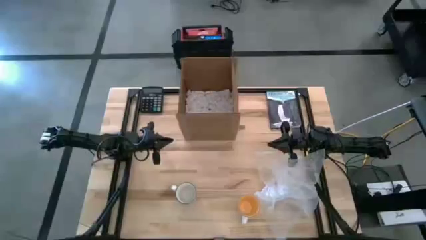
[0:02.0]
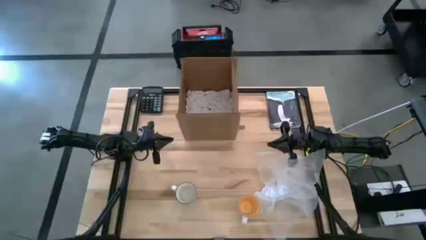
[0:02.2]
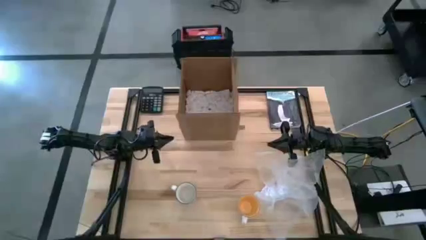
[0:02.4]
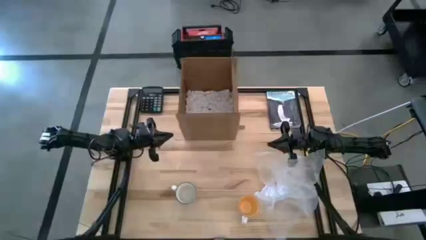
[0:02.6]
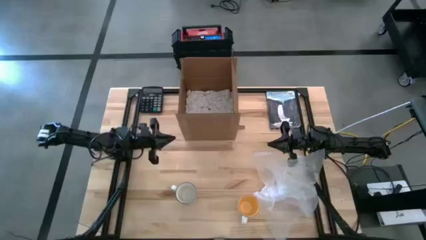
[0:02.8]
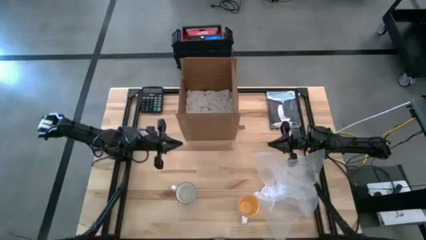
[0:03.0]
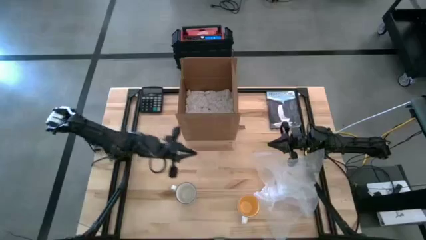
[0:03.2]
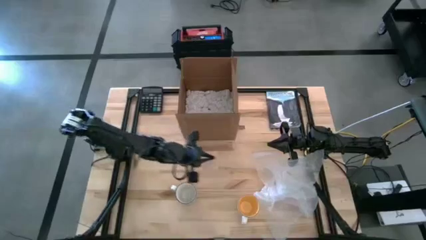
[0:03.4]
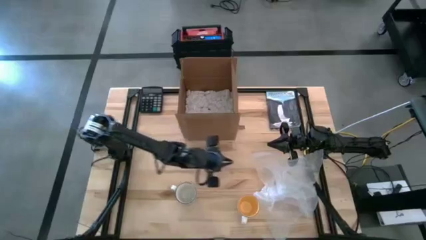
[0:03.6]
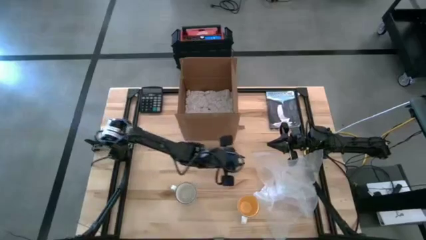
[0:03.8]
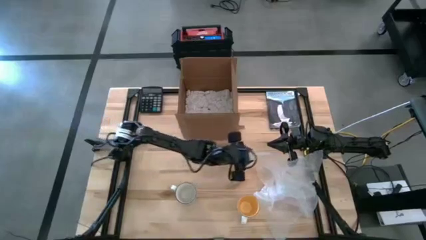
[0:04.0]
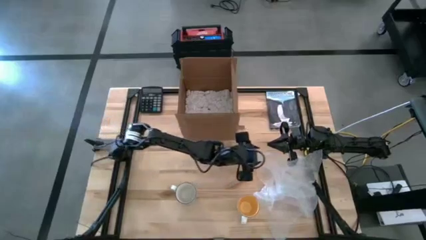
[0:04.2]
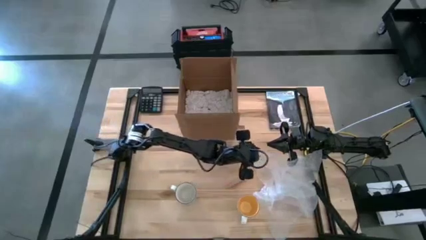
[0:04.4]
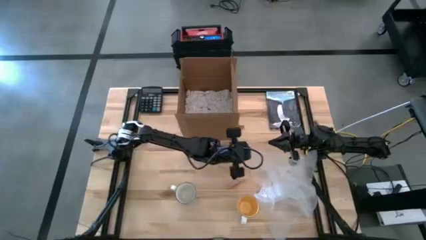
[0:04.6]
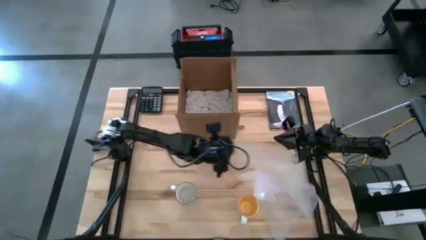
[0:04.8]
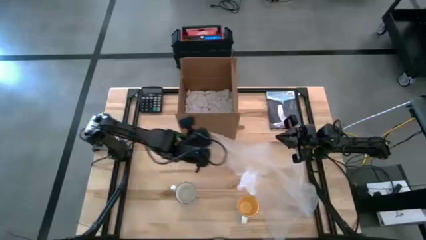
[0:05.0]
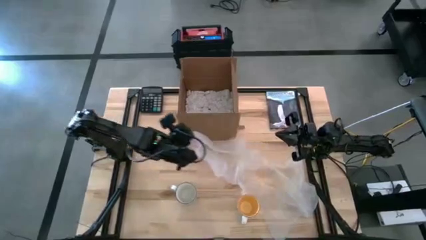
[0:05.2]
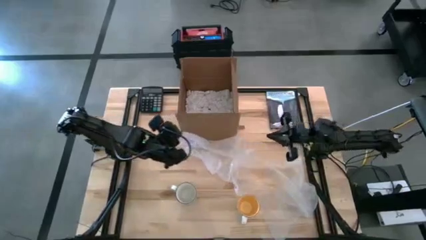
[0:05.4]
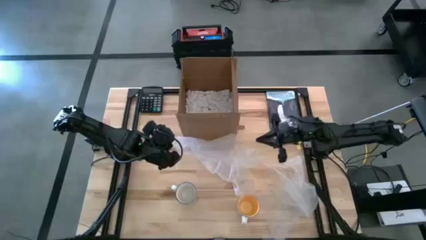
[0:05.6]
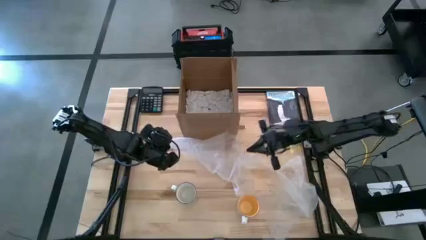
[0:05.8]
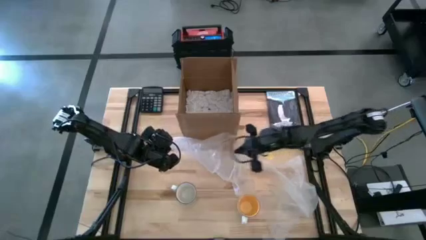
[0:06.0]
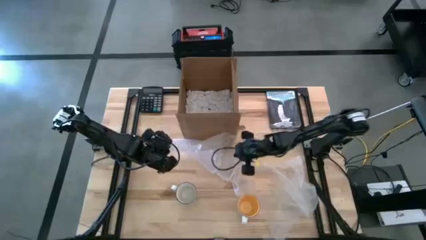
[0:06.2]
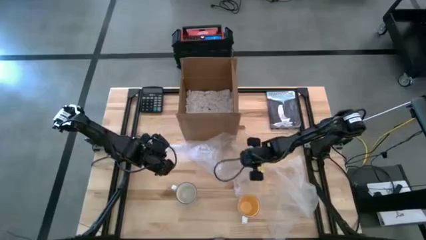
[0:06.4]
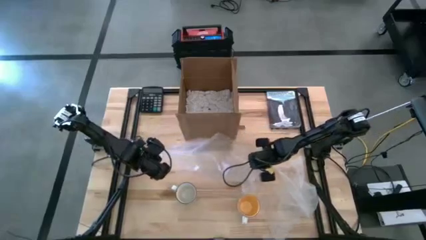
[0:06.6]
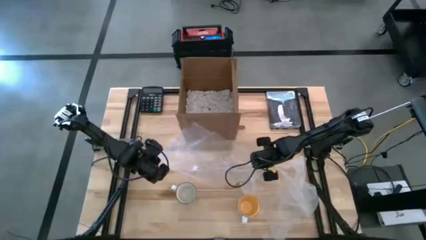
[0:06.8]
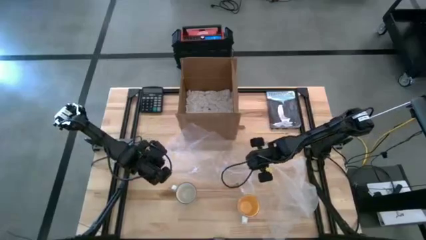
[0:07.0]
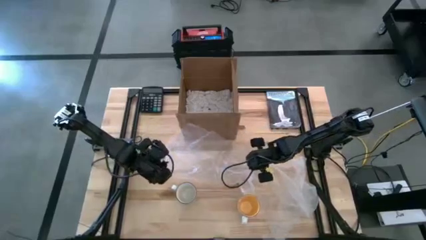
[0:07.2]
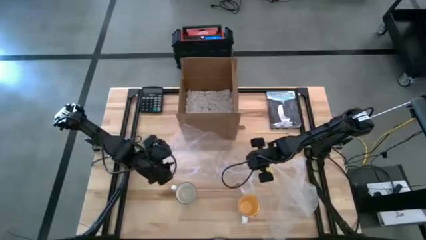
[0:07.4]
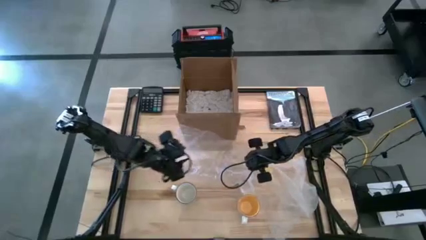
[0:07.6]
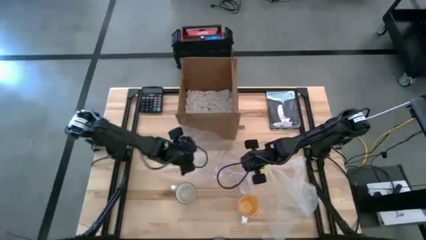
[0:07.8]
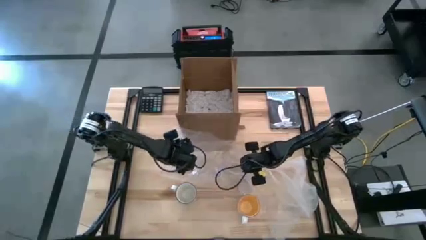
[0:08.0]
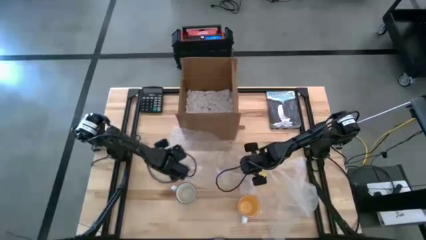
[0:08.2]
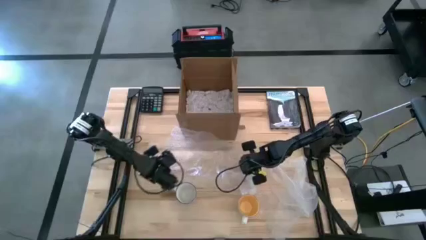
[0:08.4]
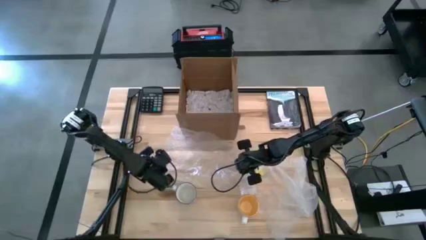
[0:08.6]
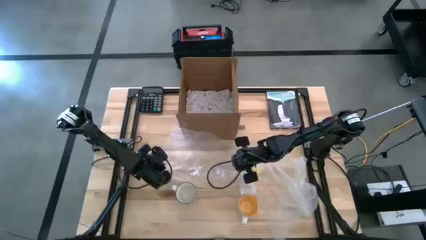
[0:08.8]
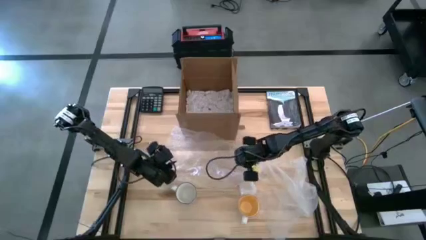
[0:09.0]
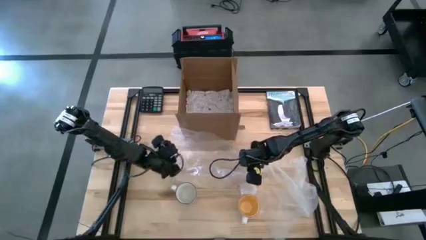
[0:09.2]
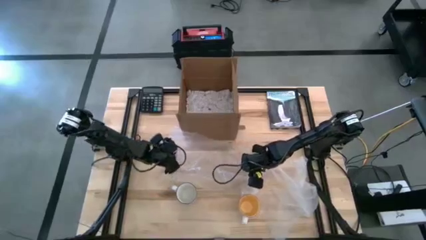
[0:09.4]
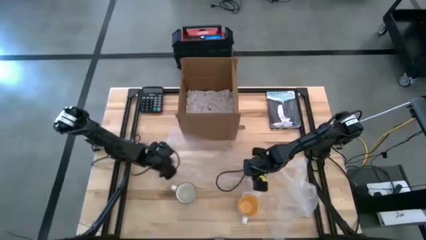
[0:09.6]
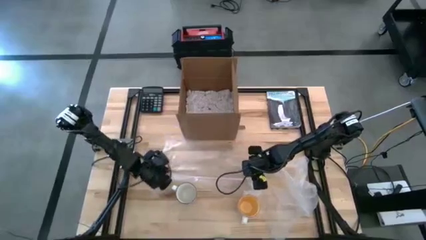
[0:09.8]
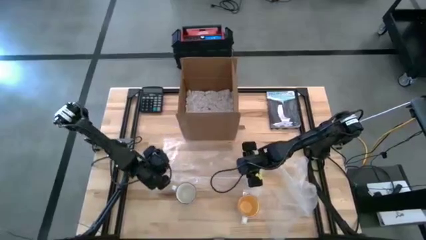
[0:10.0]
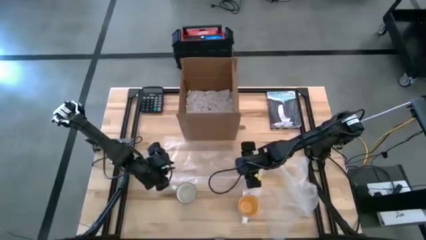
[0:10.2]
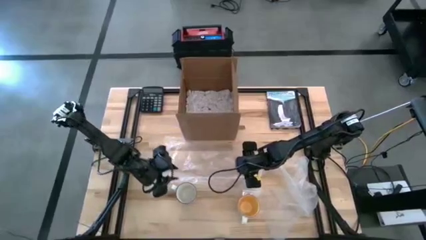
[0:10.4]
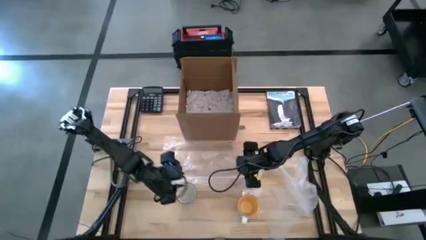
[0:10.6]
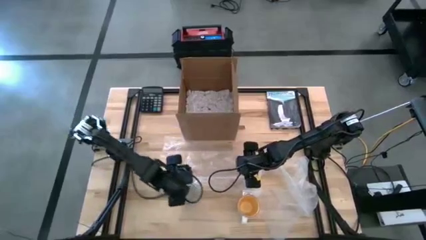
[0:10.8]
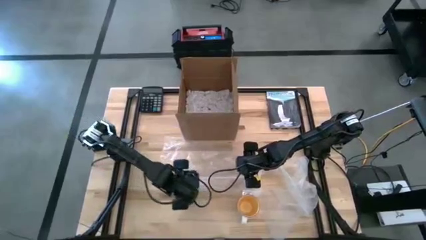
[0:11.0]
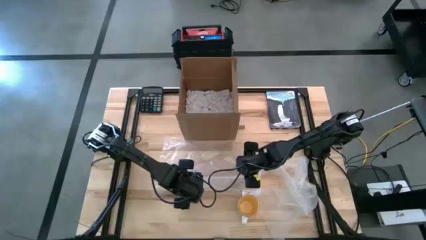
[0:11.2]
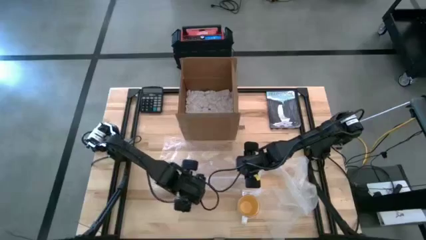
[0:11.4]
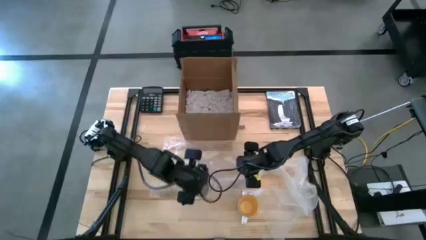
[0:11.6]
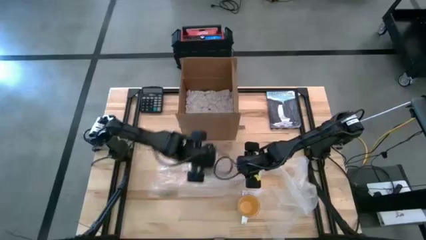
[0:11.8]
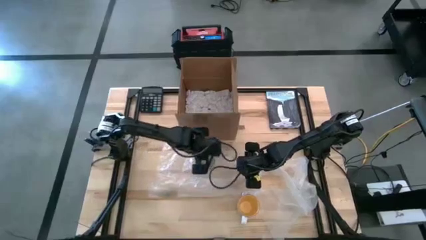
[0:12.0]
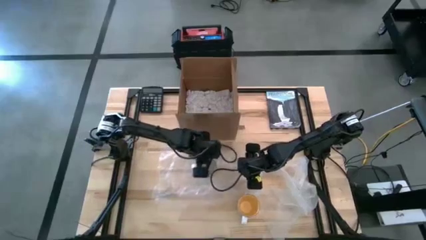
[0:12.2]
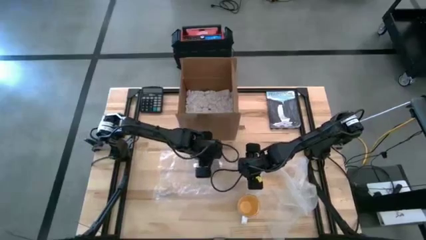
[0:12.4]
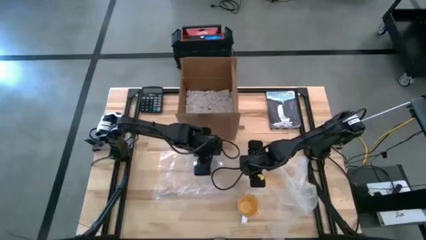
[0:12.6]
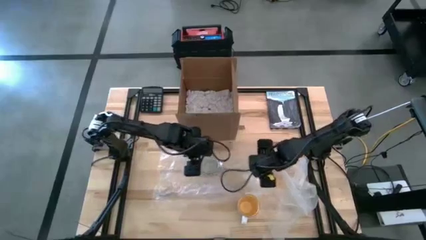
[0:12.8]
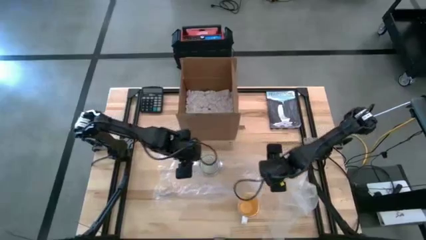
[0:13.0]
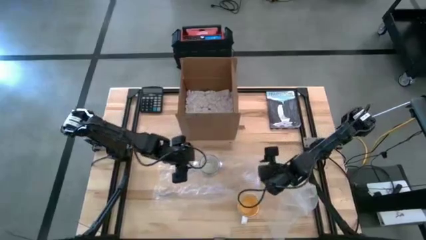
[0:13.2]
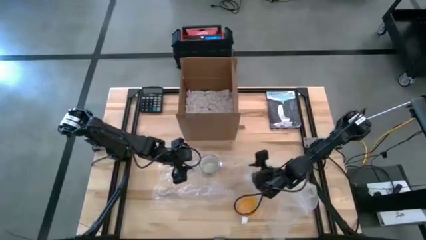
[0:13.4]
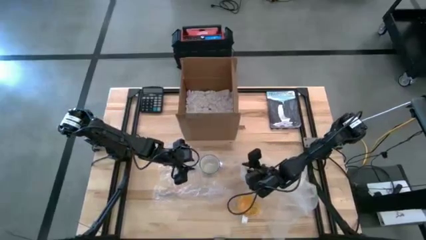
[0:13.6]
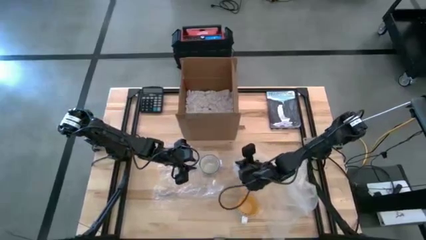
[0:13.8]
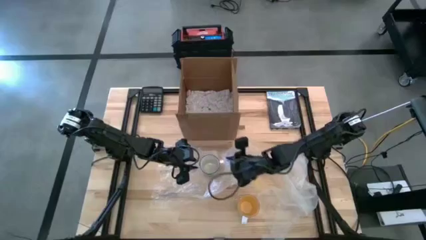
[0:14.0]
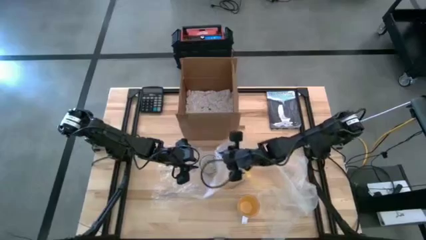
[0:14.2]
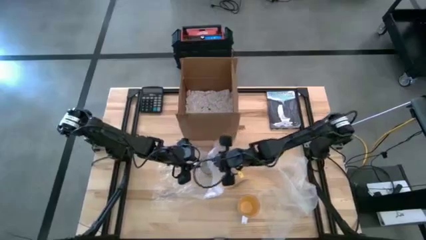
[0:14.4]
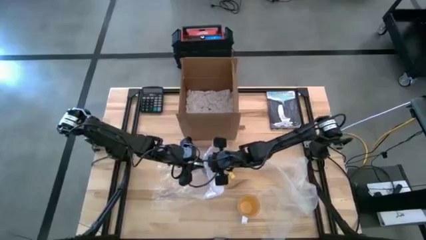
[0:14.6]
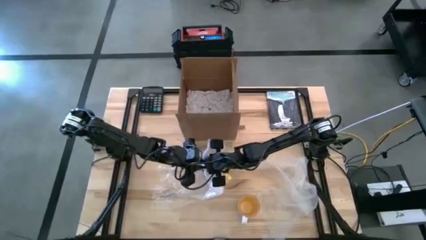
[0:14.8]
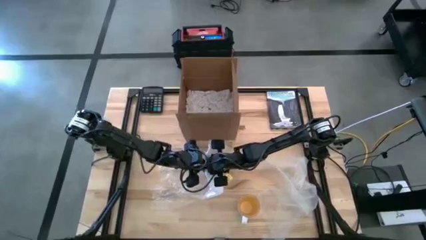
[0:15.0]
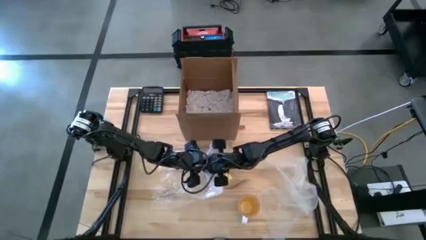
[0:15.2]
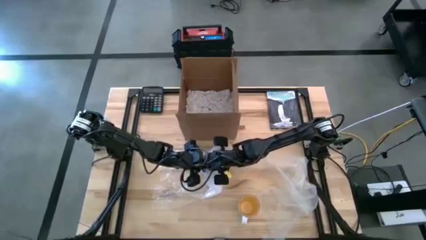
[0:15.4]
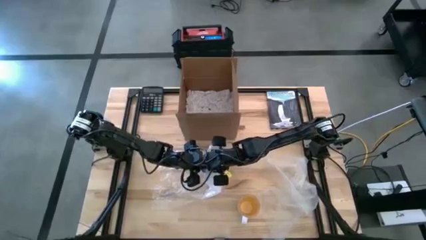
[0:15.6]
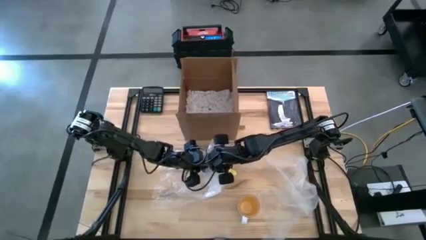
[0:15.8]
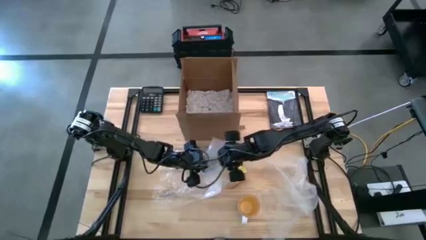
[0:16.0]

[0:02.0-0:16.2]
Task: wrap mug
Wrap the blue mug with bubble wrap
